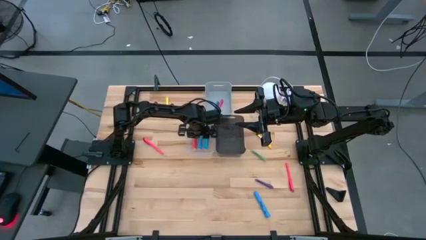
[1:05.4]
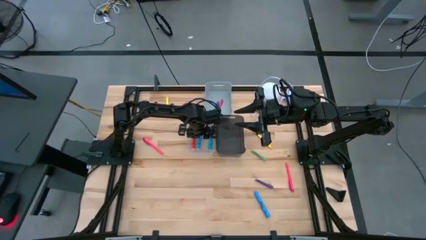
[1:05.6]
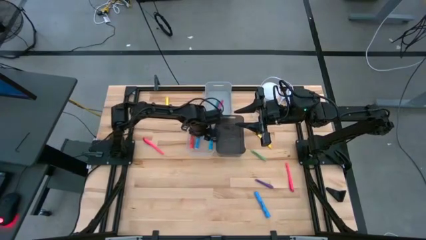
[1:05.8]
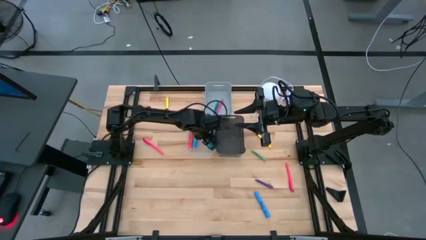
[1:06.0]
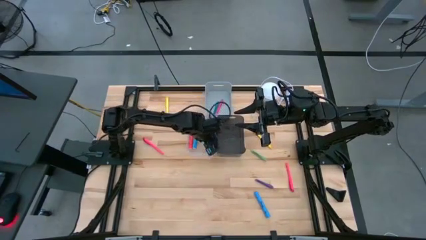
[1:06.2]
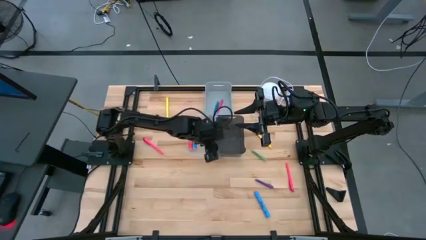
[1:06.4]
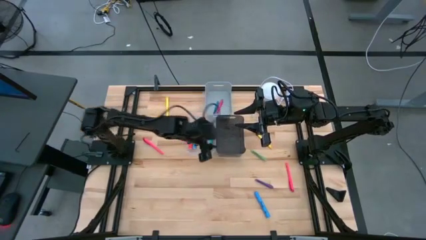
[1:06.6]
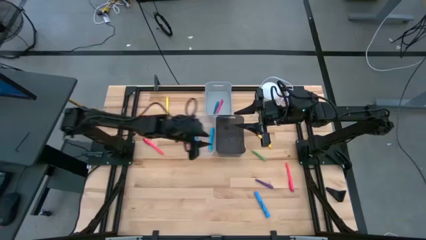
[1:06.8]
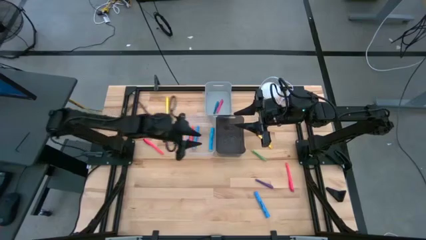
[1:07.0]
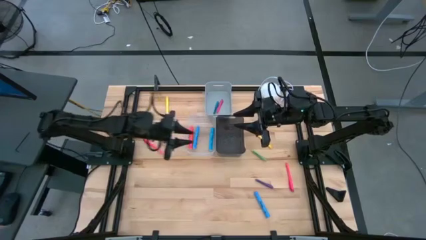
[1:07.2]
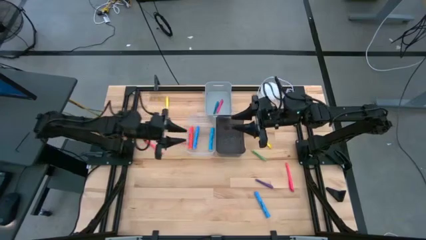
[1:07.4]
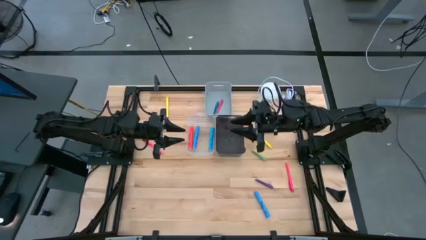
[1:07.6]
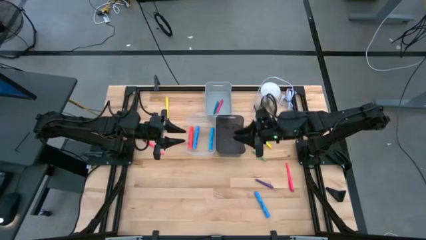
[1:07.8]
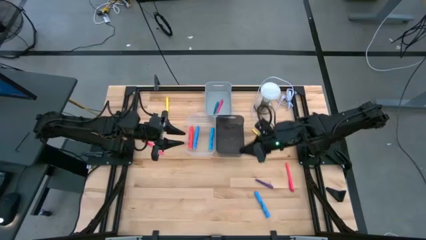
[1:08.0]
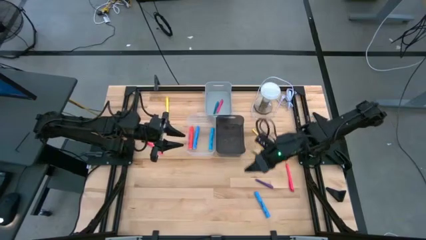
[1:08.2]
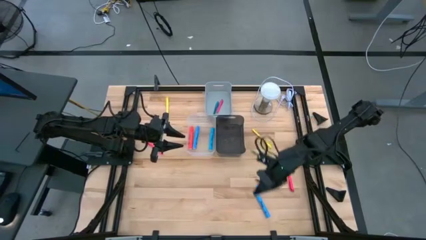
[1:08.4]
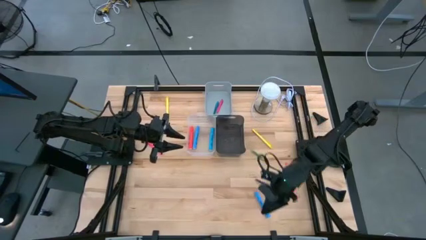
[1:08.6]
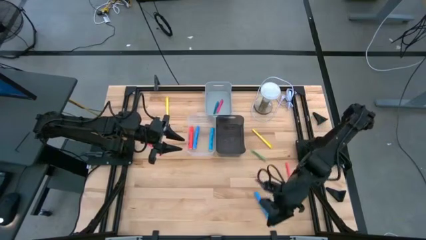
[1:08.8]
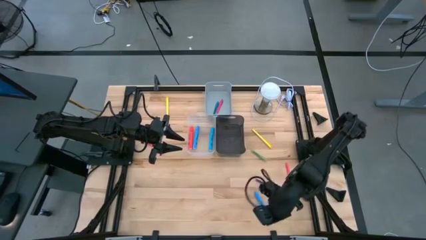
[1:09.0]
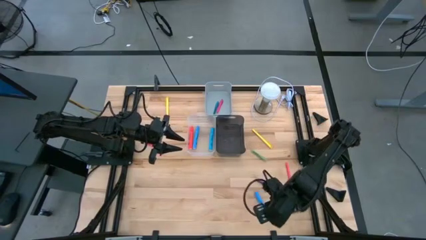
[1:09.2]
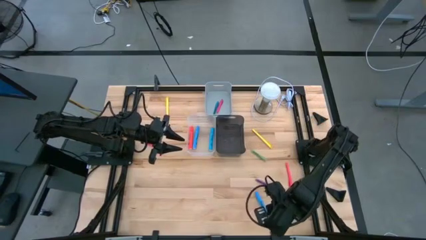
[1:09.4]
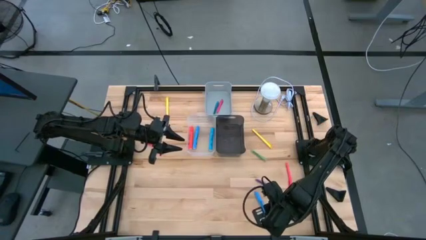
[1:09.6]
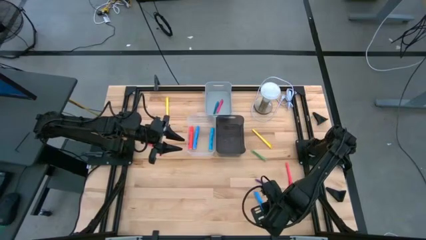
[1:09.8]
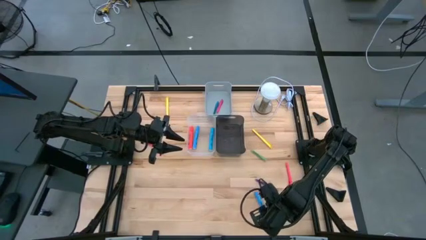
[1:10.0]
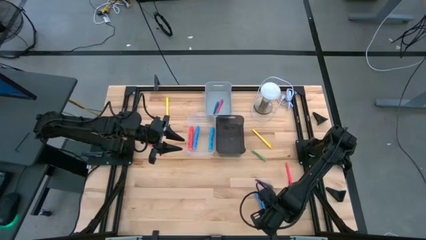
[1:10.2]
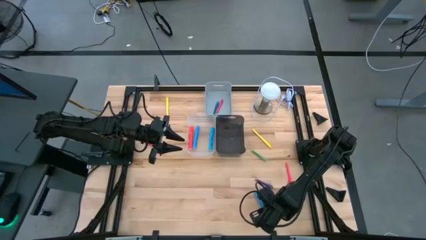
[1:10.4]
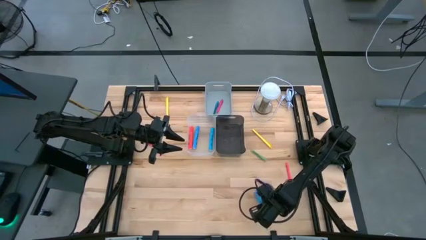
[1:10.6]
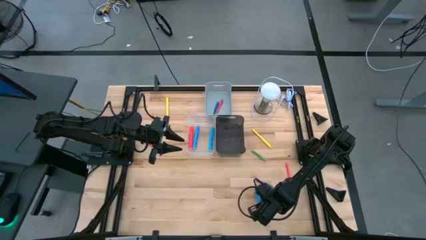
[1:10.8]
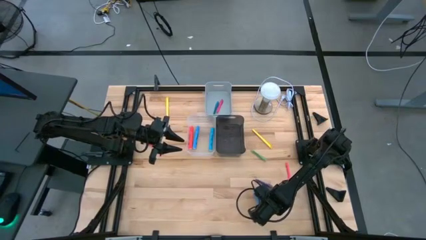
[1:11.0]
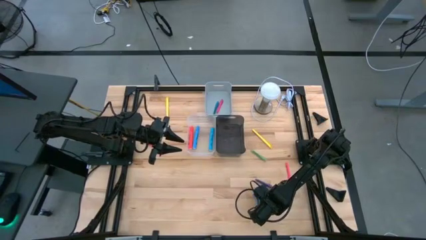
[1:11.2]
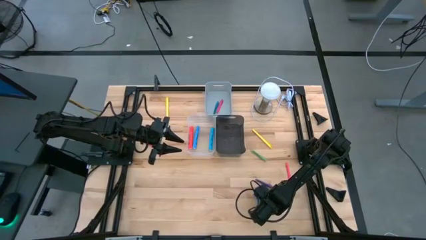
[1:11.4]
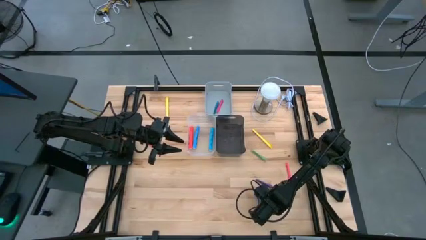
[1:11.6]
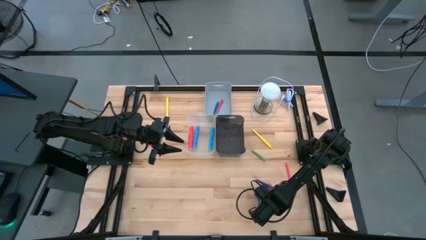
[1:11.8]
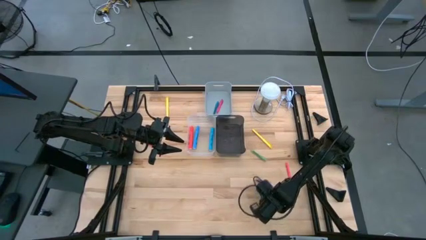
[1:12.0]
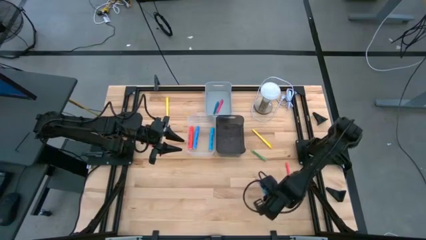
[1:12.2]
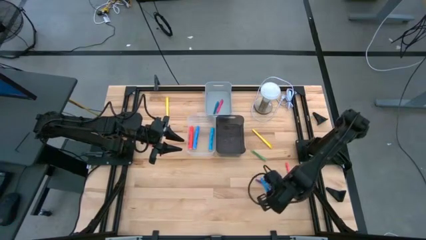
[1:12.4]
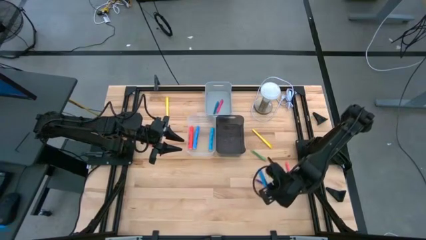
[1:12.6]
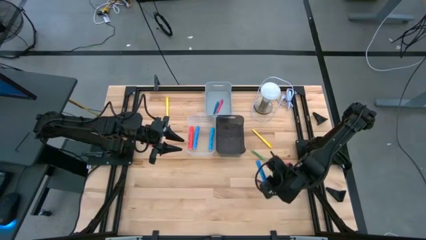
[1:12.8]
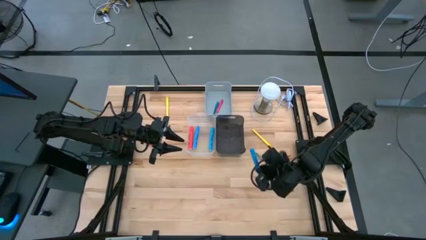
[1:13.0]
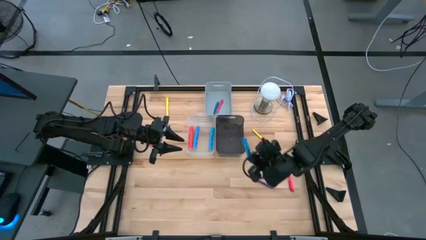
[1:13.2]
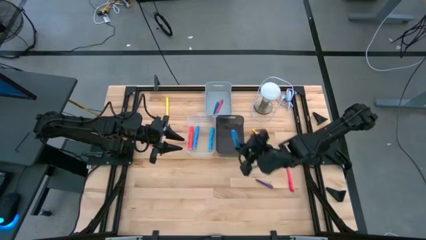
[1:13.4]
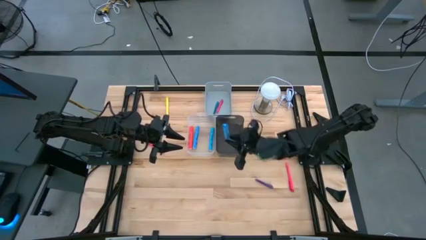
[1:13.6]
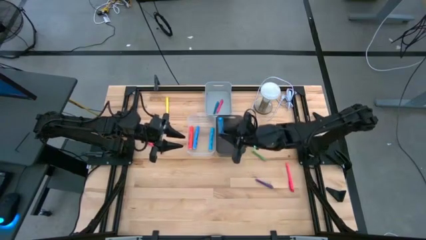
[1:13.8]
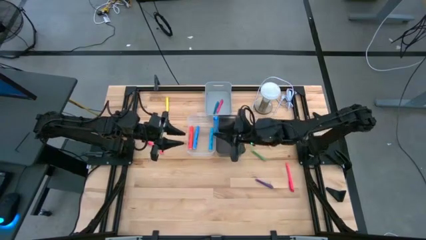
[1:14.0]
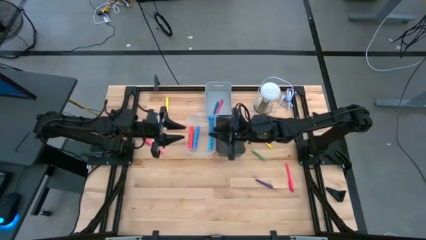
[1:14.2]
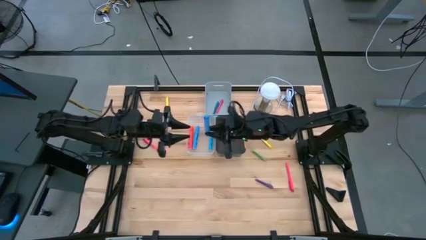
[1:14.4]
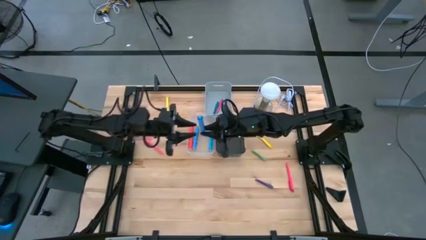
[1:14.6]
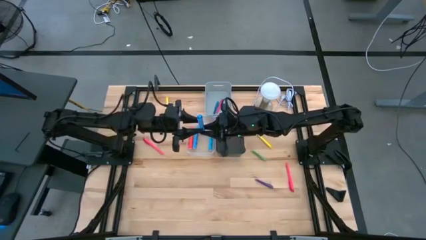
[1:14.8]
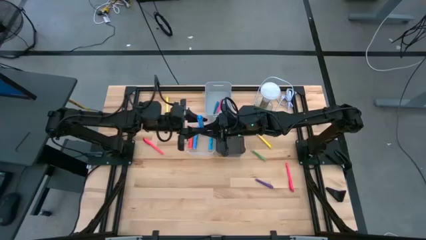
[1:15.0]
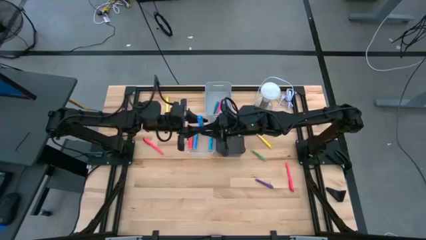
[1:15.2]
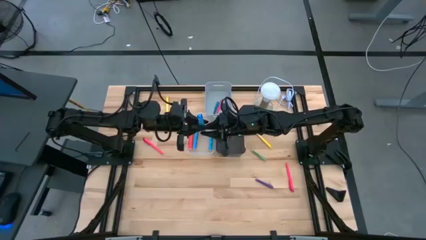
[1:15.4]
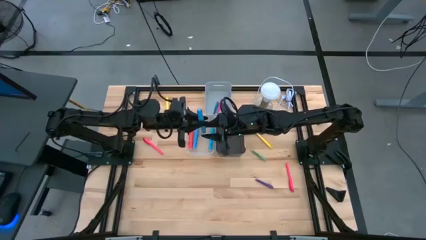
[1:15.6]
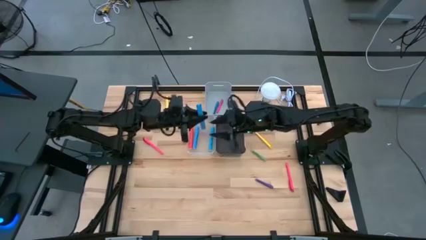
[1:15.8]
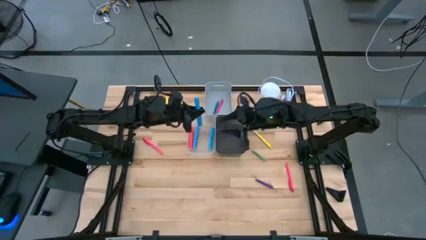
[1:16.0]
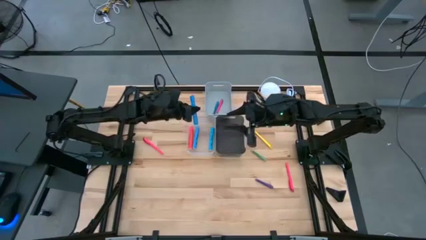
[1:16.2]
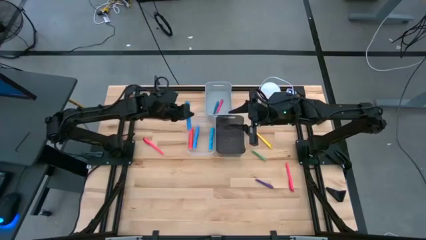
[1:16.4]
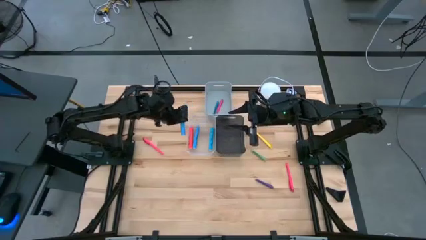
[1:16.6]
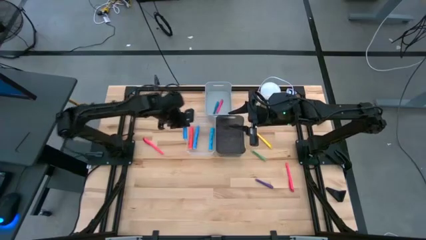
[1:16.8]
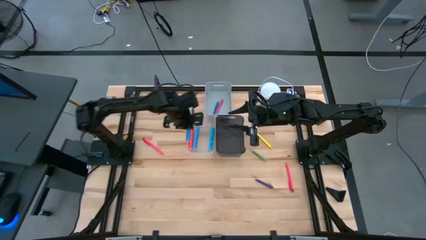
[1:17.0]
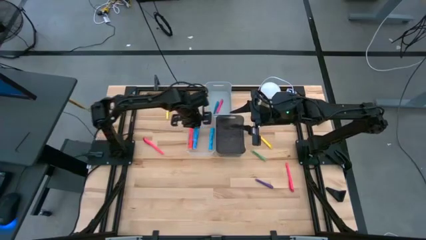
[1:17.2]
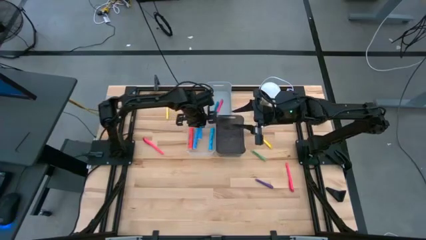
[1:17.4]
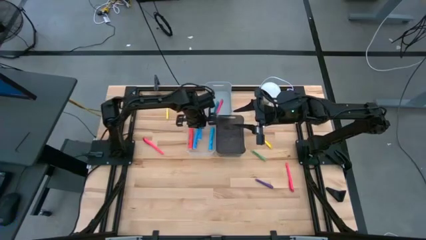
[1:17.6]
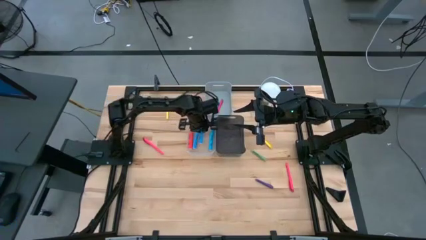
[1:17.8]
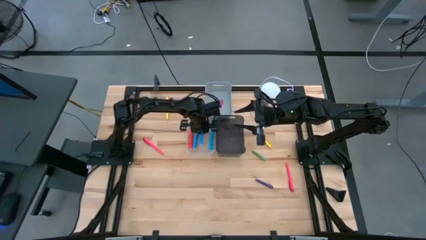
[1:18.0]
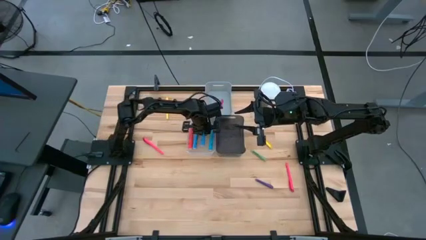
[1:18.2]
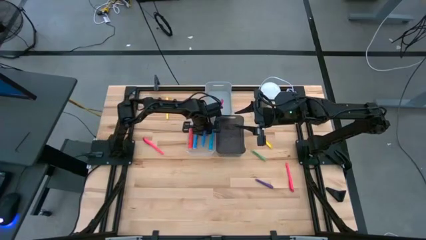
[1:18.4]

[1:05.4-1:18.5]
Task: Pick & Place Markers
Put the blue highlighter into the transparent bin
